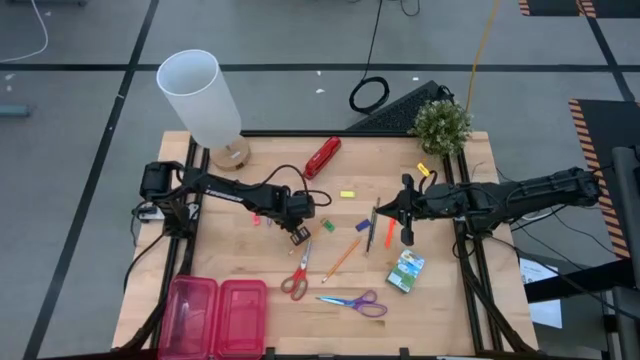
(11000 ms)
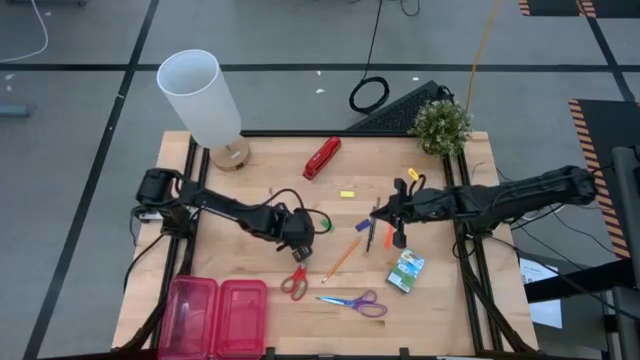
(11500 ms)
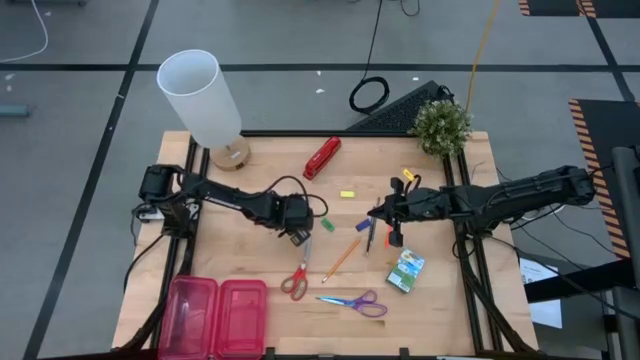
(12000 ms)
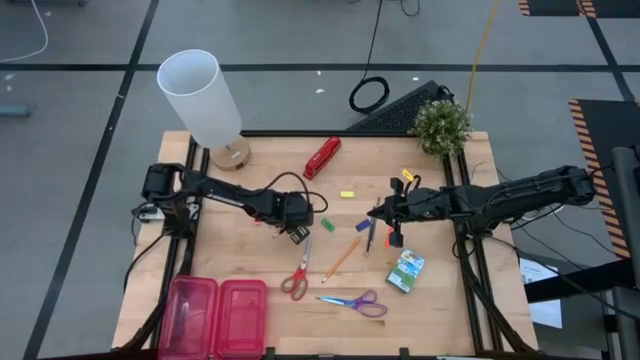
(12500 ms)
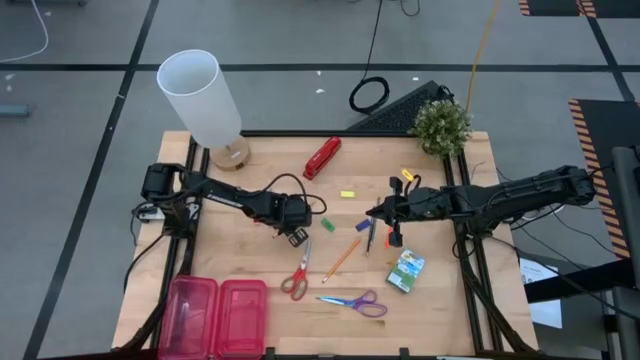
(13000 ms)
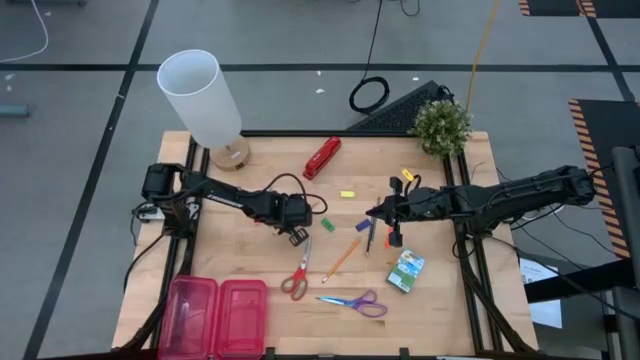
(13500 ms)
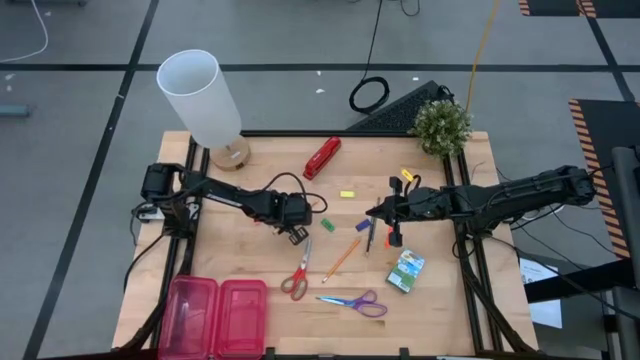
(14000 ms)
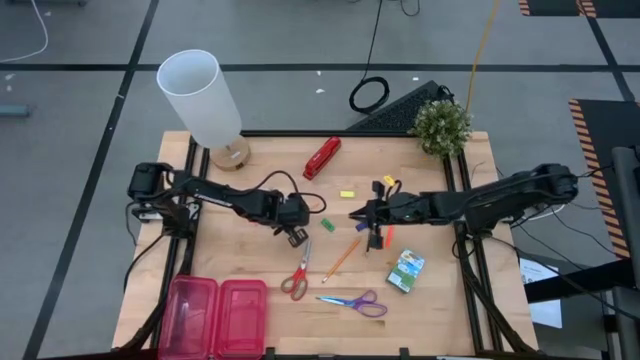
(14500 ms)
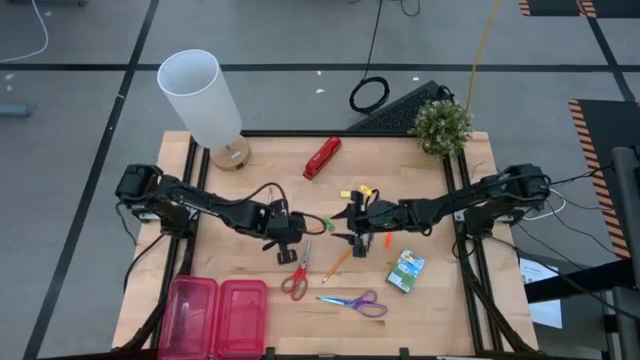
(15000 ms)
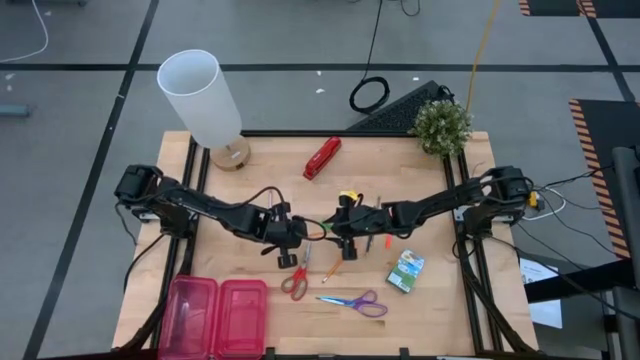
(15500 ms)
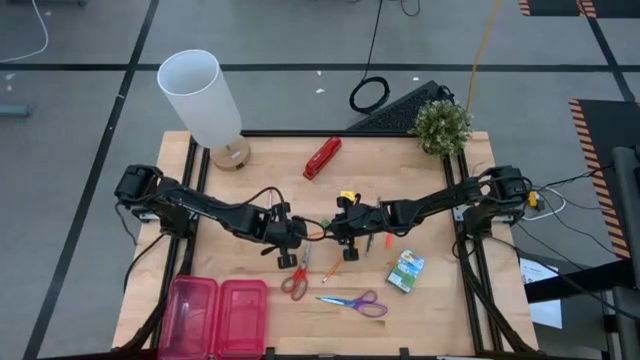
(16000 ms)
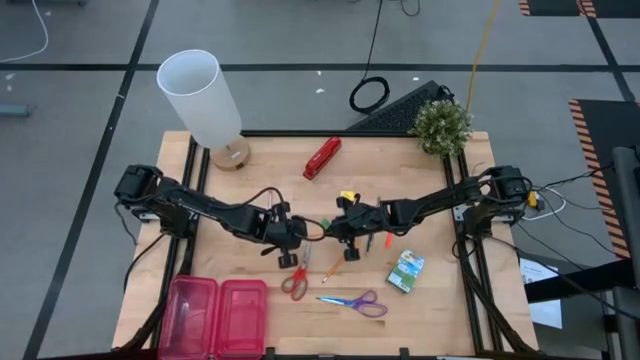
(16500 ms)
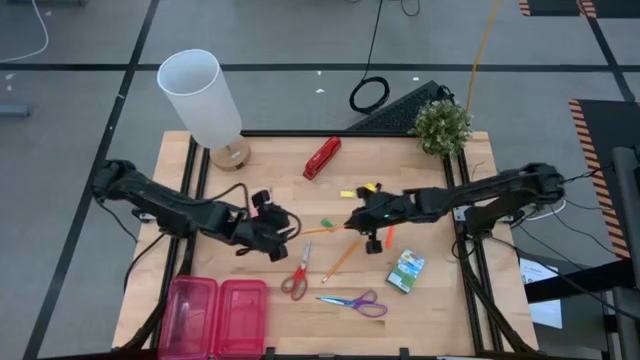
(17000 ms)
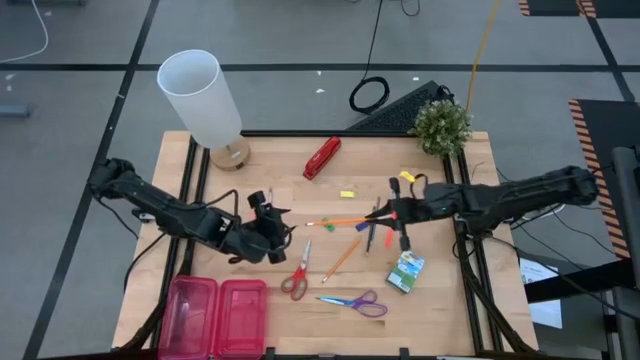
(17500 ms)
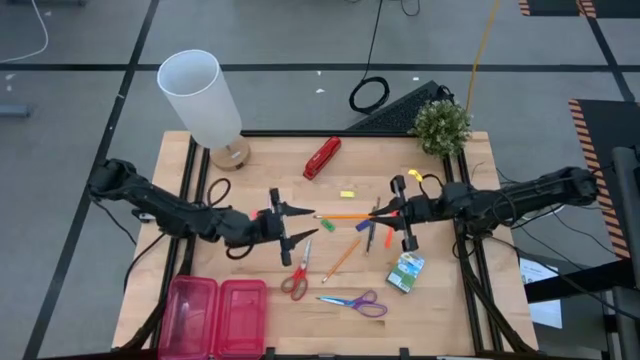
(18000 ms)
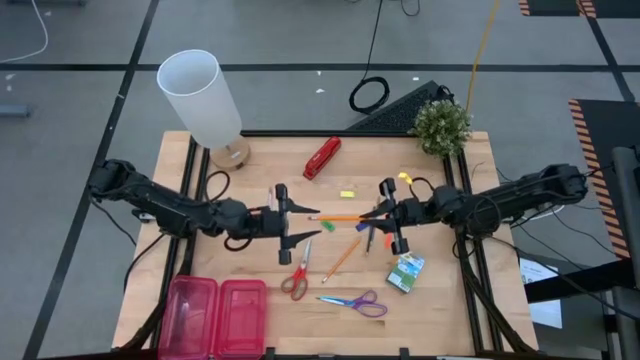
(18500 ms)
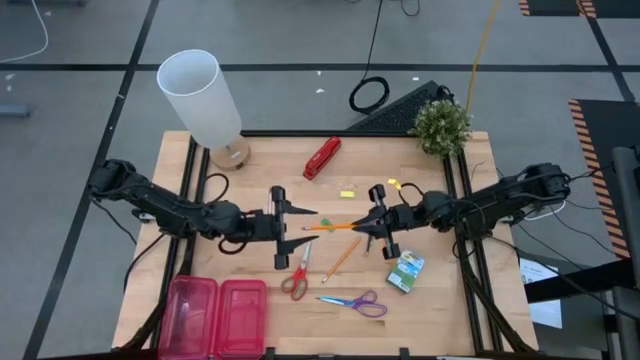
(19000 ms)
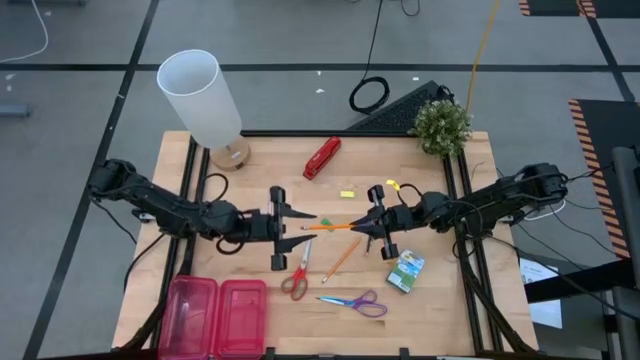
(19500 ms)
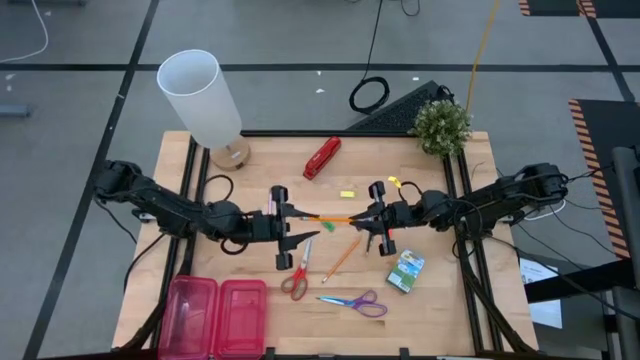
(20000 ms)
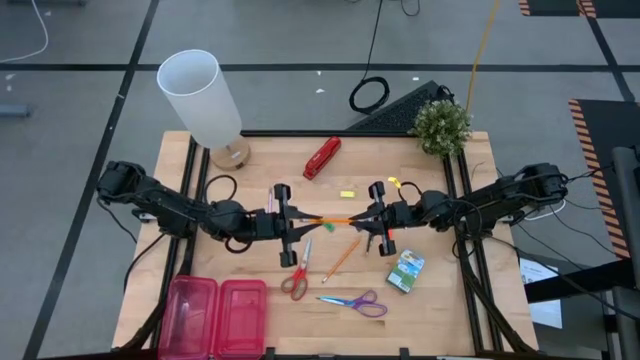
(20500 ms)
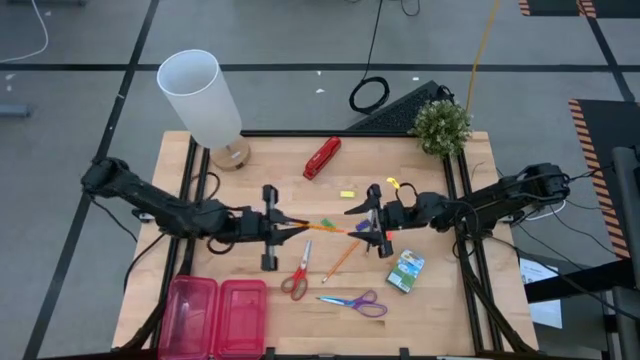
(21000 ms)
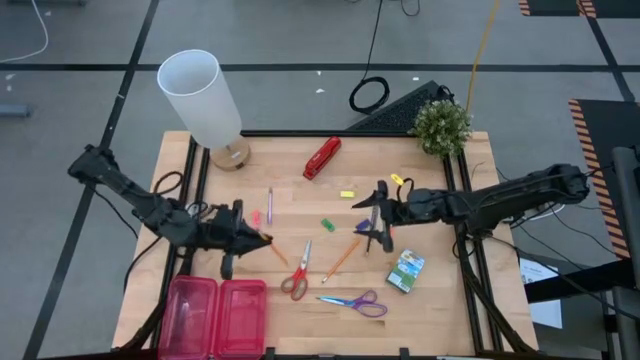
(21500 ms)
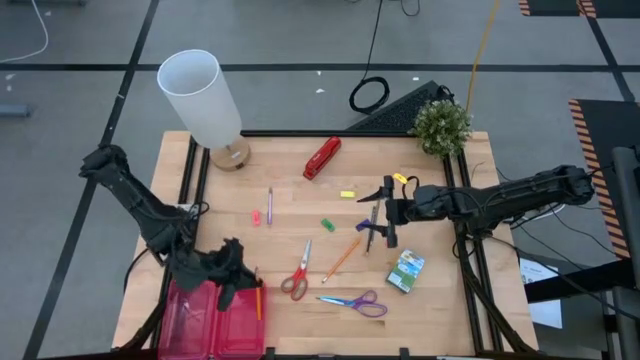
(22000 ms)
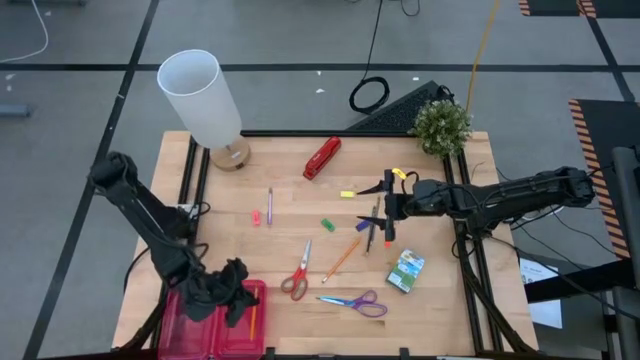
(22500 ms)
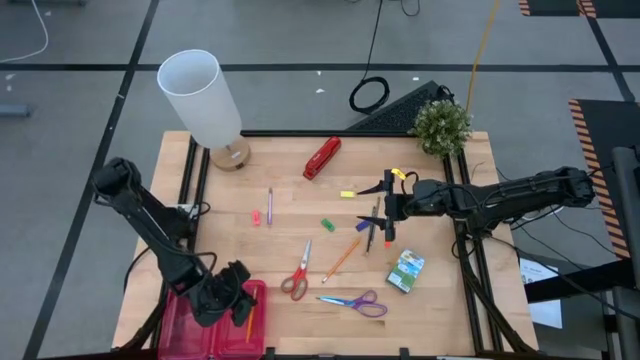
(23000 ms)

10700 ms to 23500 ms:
Task: Pack school essentials
Put the left yellow pencil into the red supply box

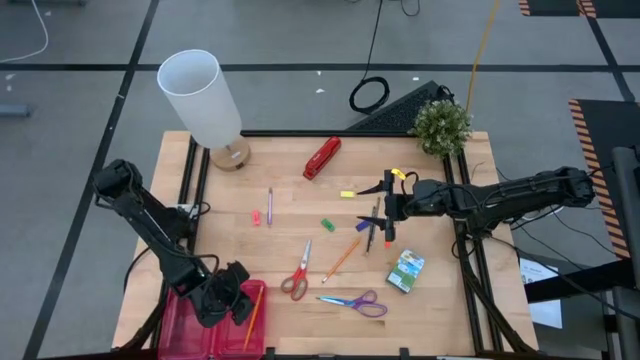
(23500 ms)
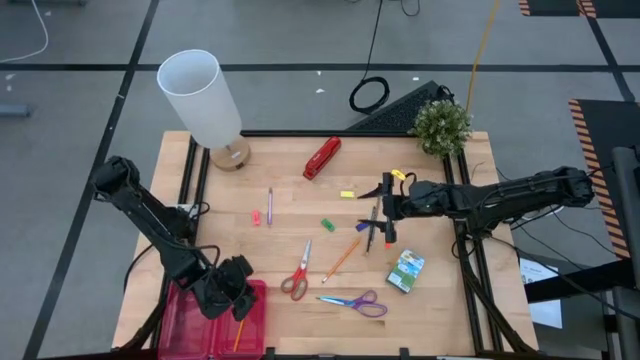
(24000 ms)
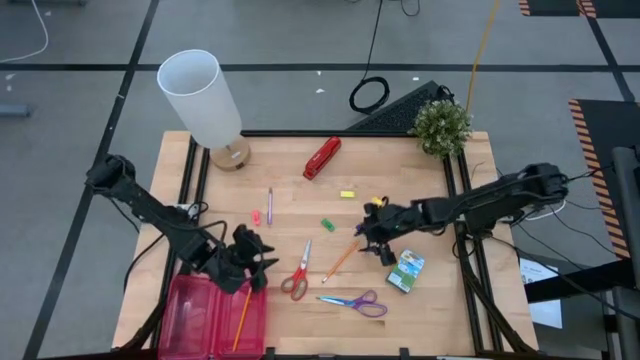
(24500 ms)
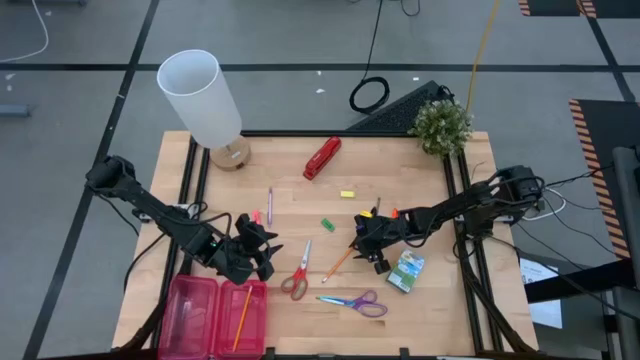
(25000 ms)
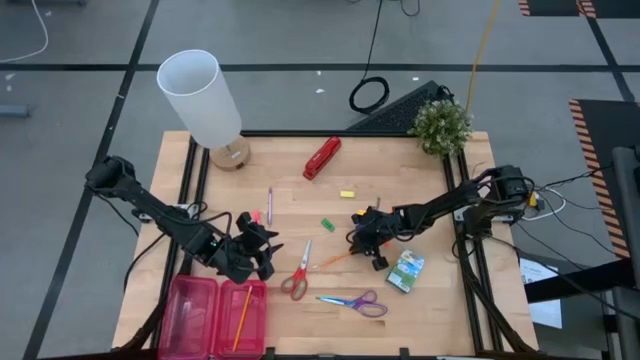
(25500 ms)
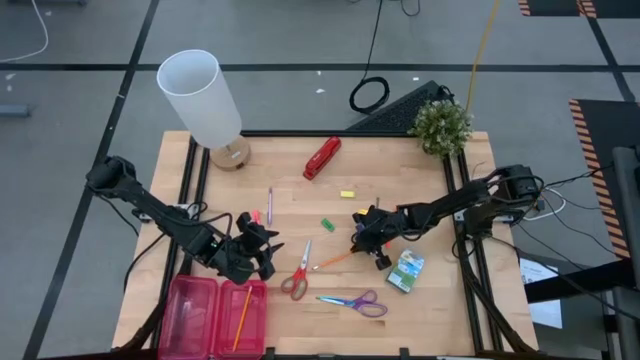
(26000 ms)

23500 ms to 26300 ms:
Put the yellow pencil into the red supply box

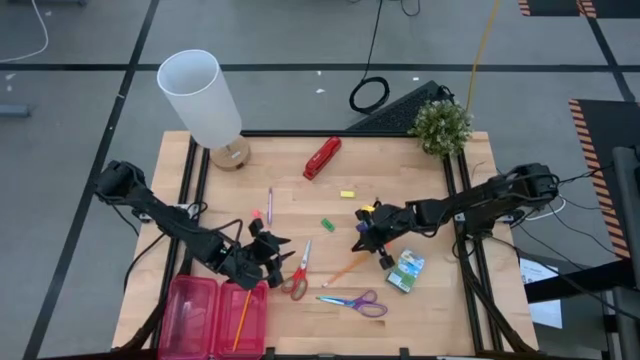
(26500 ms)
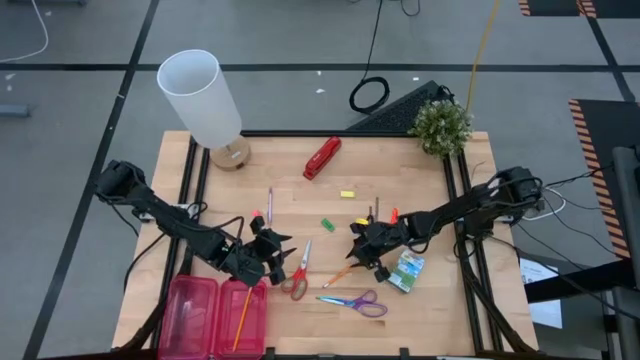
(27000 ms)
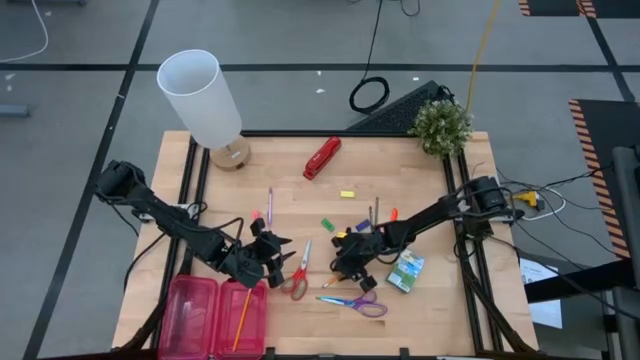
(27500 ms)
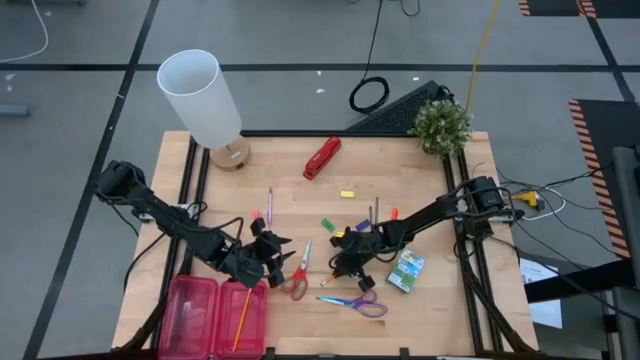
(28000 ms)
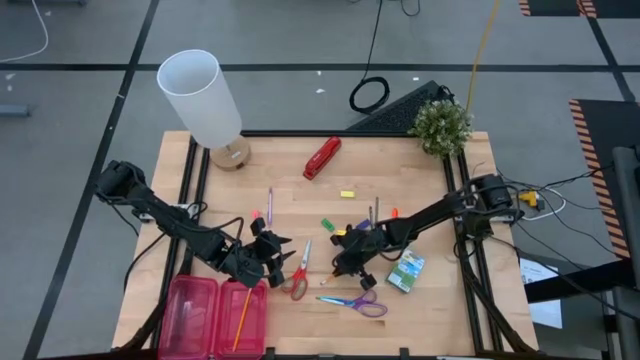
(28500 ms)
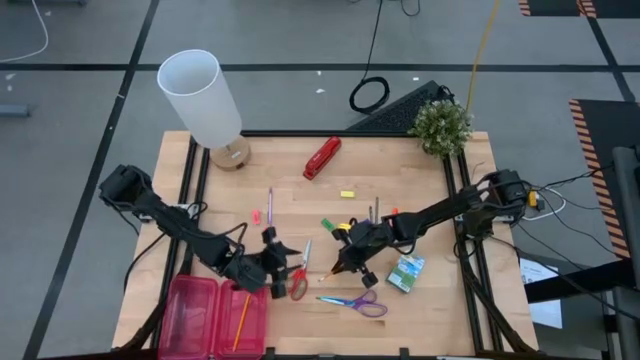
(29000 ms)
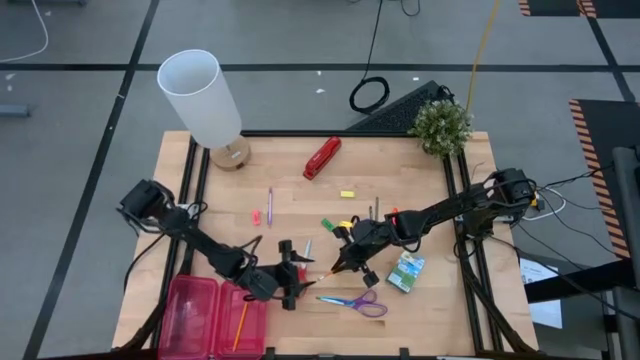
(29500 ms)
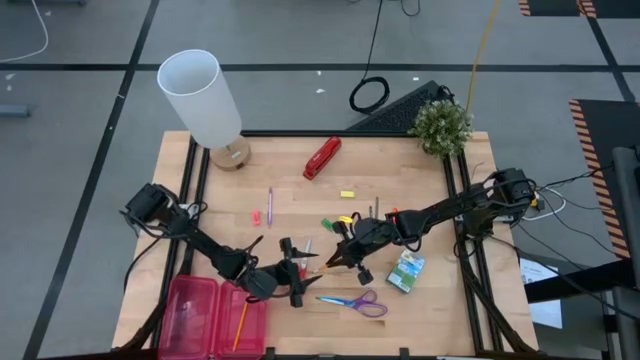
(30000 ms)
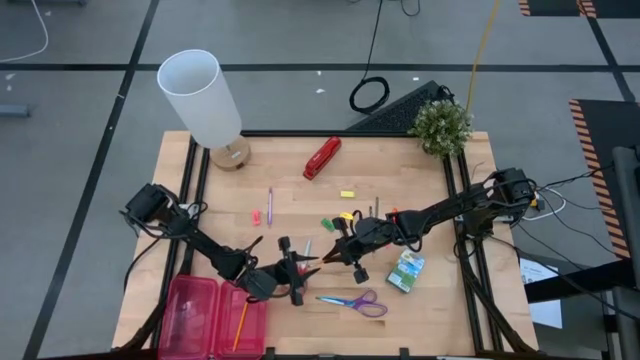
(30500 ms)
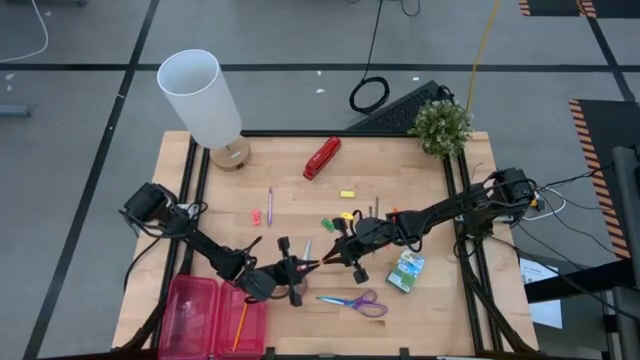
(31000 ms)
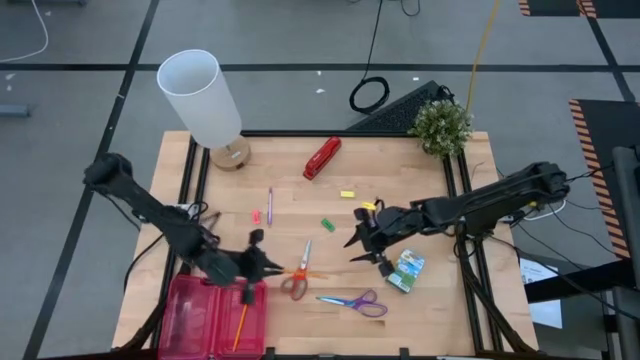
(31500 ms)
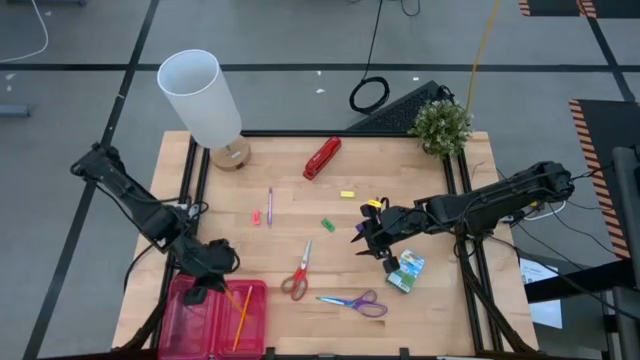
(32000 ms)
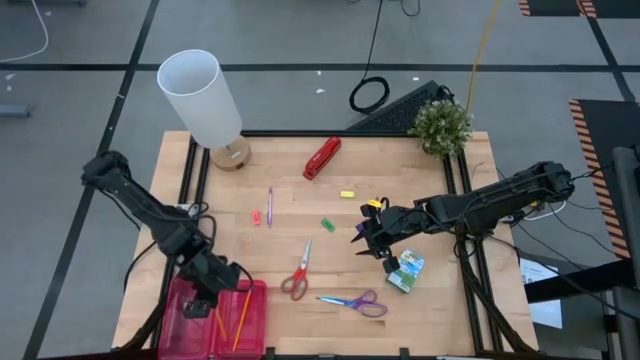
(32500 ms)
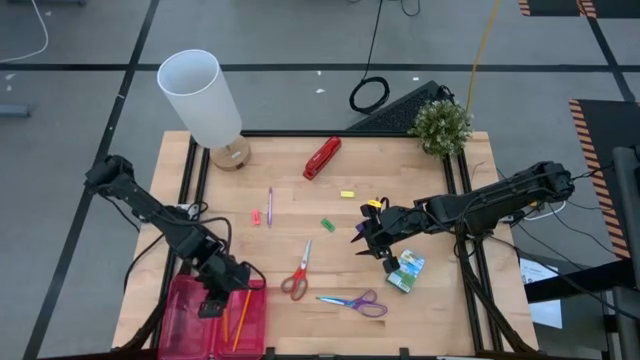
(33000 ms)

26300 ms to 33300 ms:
Put the yellow pencil into the red supply box
